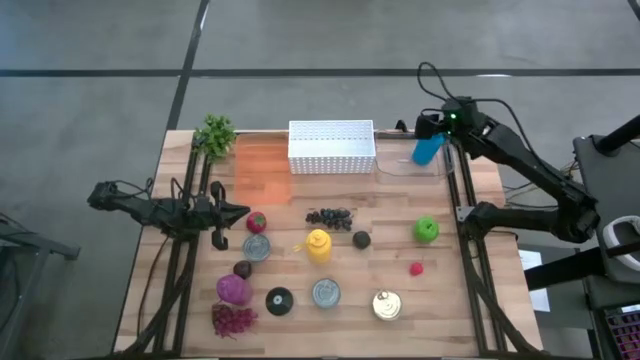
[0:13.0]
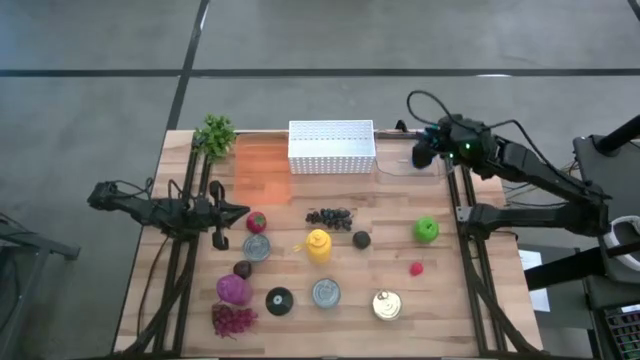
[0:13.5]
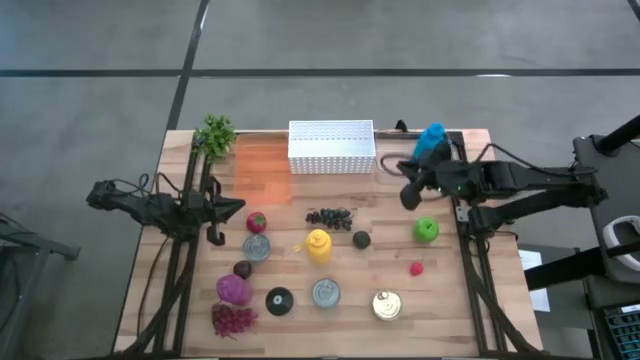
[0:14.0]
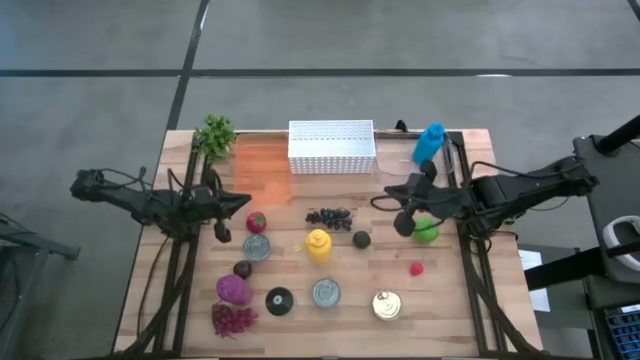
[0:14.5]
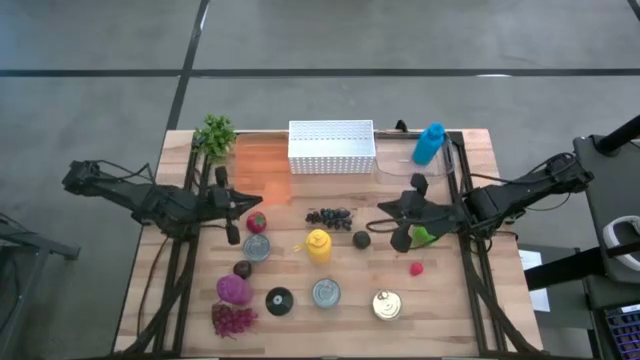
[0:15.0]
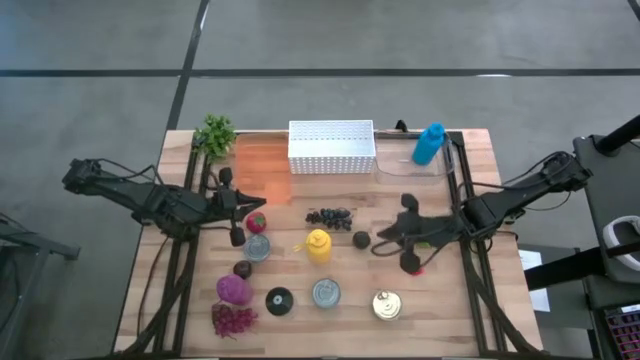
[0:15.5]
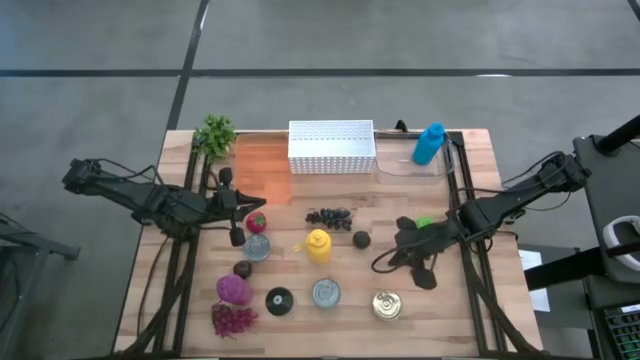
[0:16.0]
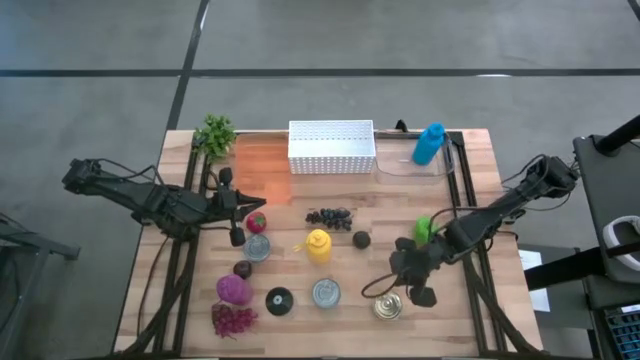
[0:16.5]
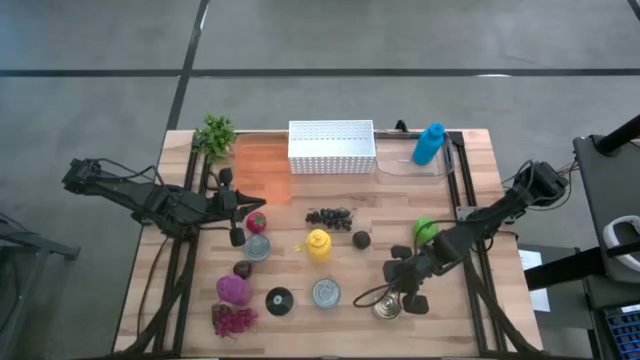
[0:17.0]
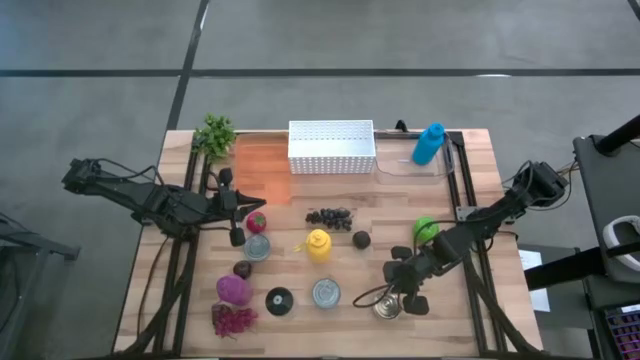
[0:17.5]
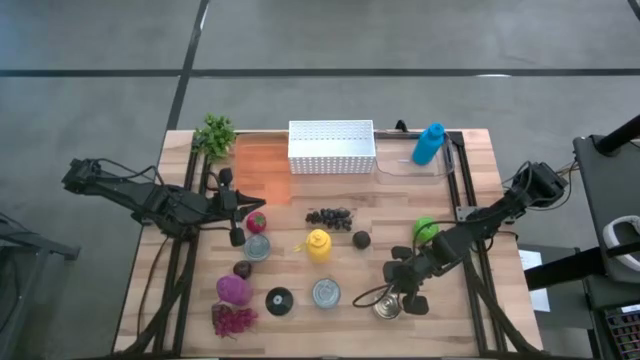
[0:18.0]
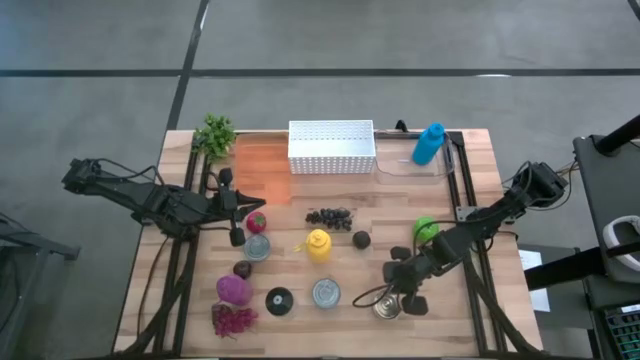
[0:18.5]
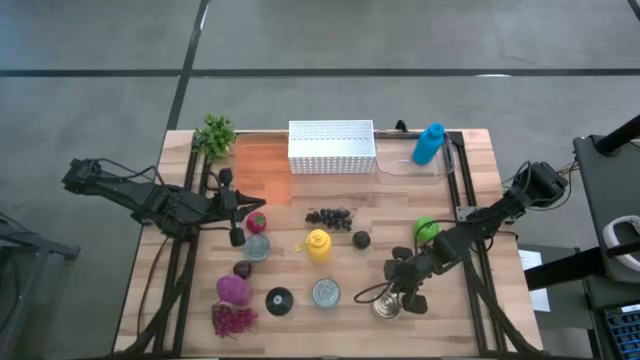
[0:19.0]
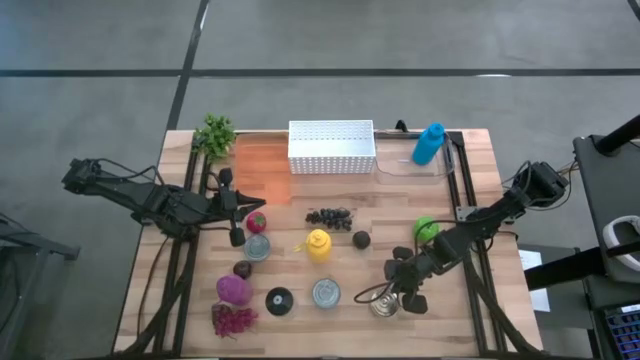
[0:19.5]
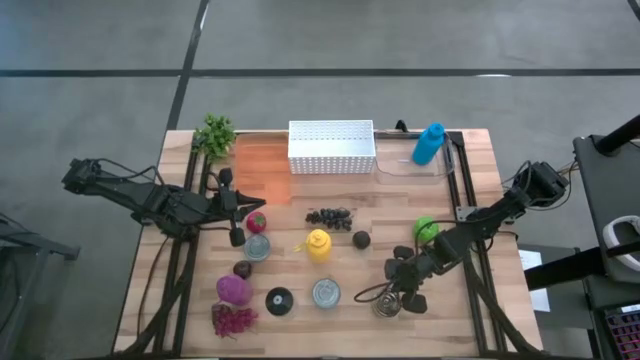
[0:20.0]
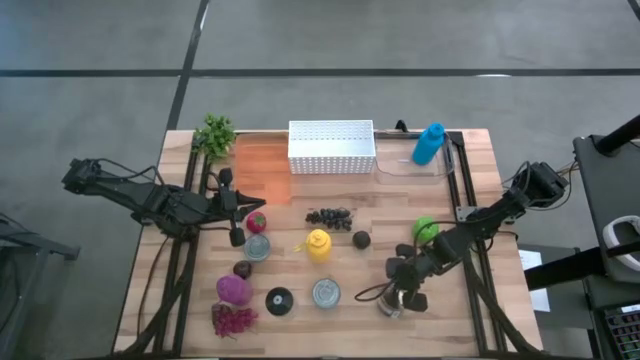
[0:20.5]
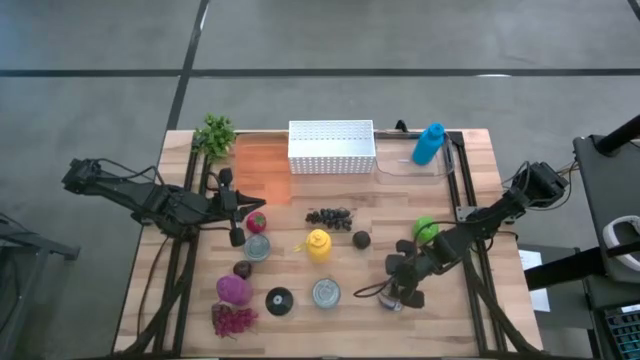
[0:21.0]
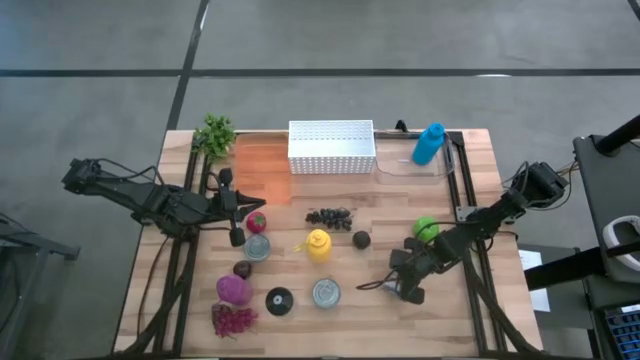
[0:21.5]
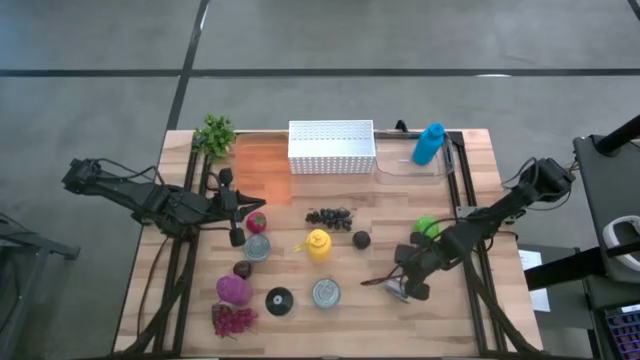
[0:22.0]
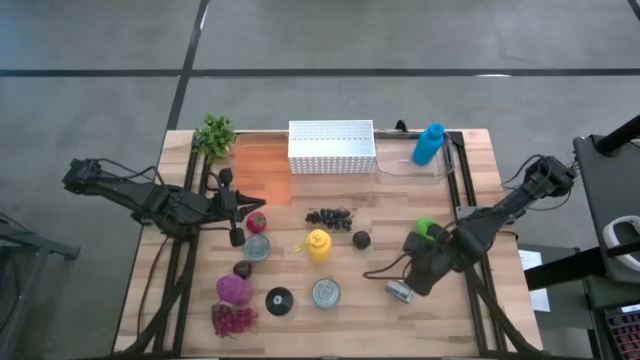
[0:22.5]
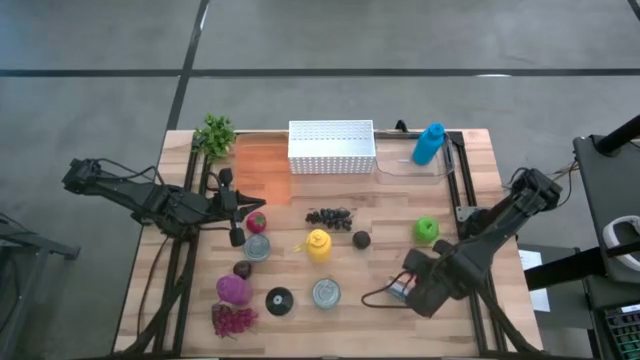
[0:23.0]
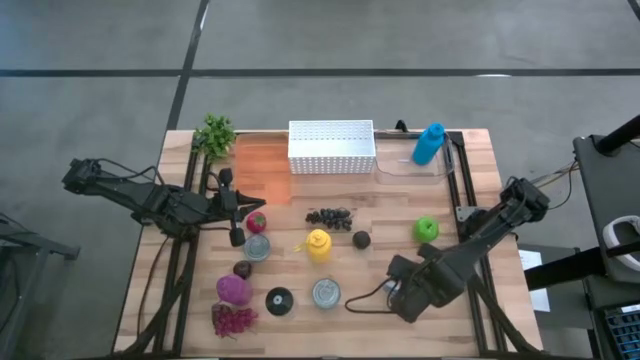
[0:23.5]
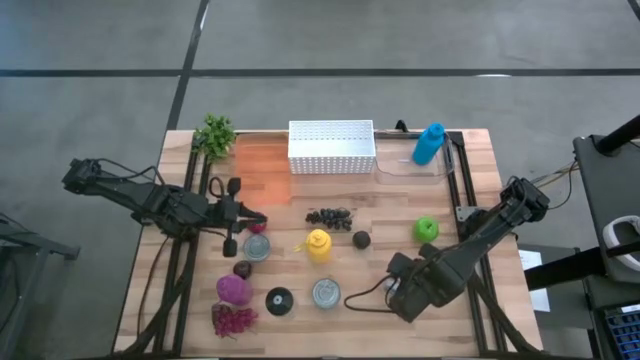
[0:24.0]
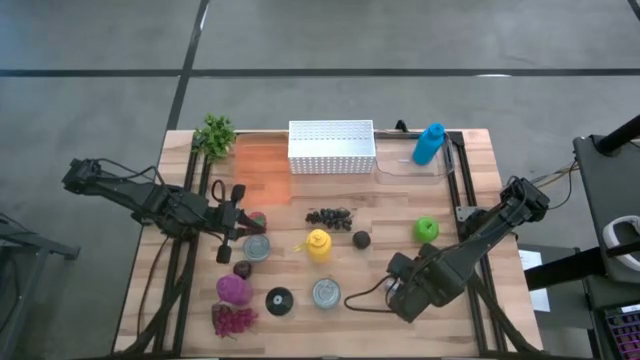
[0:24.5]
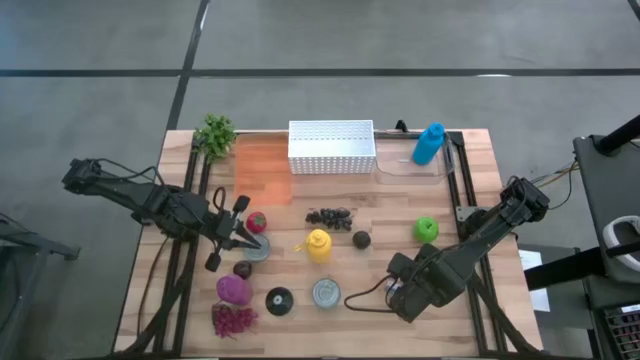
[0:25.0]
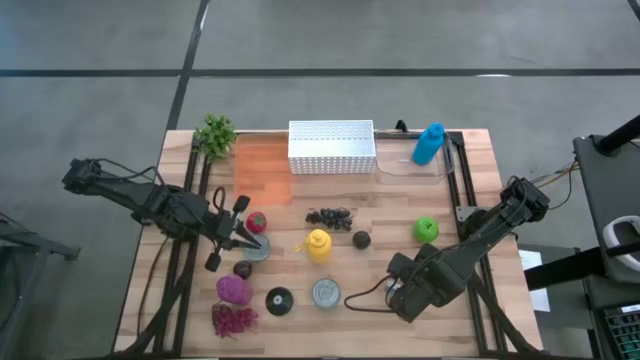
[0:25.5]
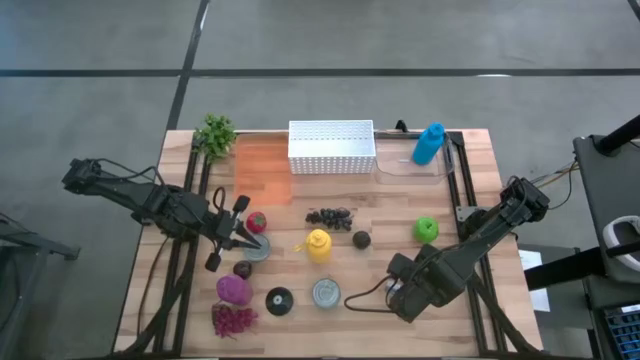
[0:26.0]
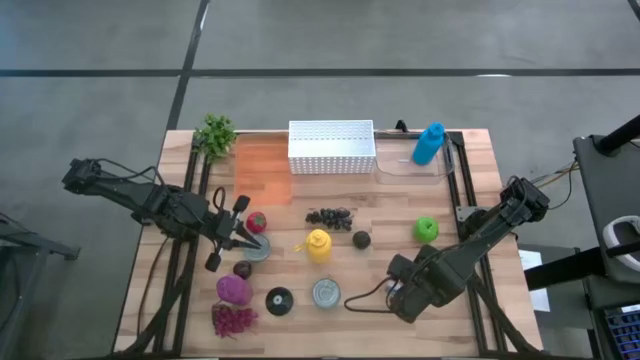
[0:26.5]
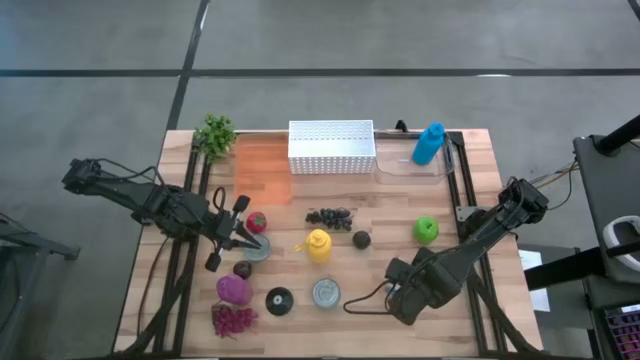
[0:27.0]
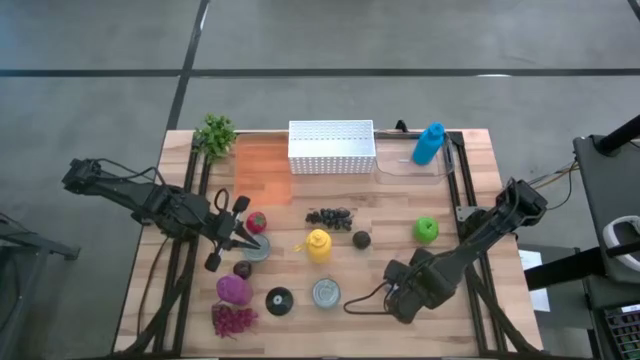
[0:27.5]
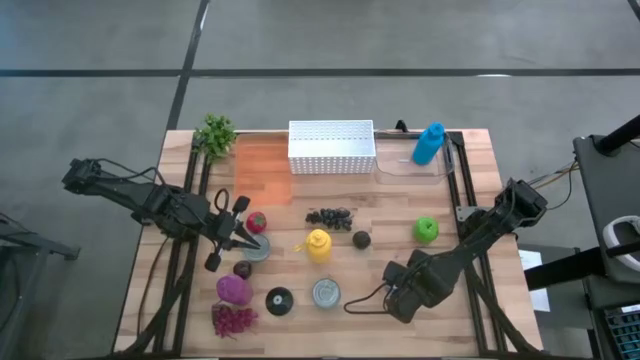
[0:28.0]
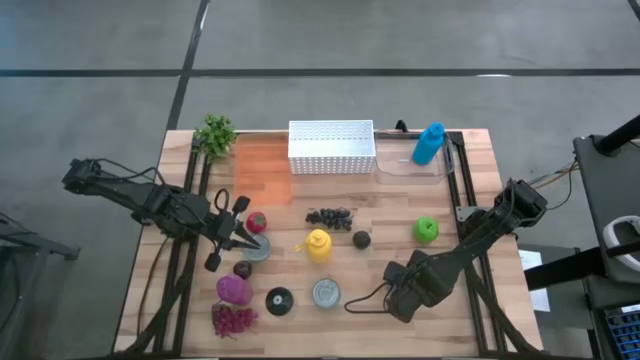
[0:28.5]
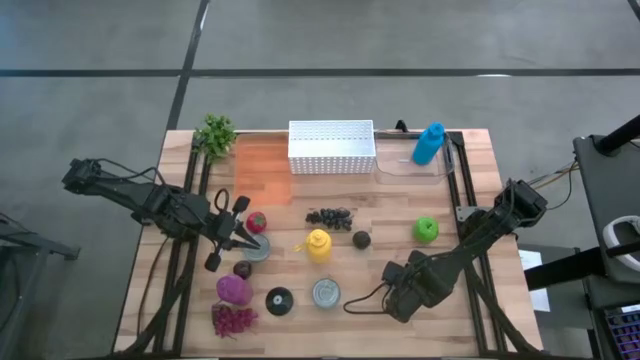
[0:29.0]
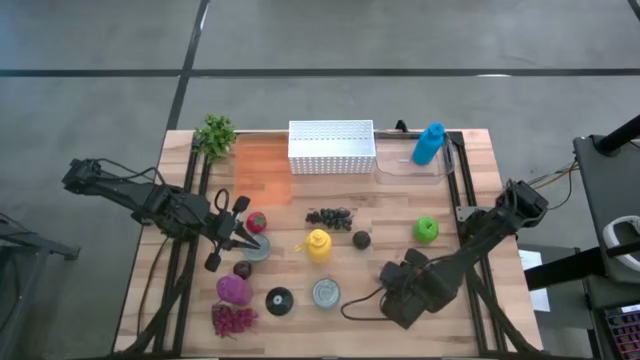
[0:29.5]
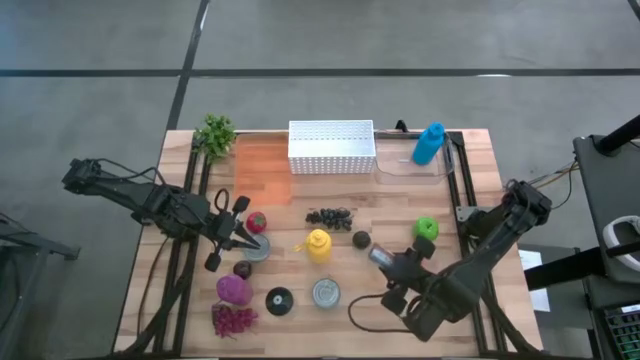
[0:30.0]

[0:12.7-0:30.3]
Task: Pick & Place Food Item
Put the blue-pink tuna can into the orange bin

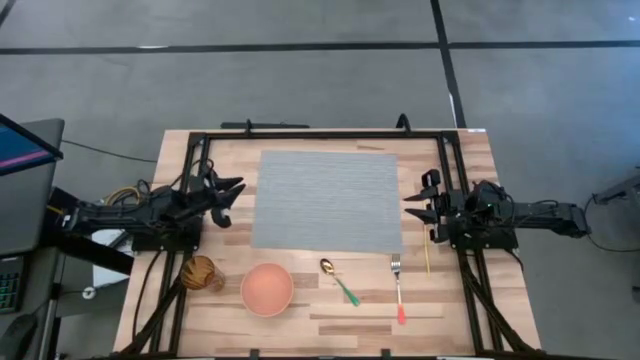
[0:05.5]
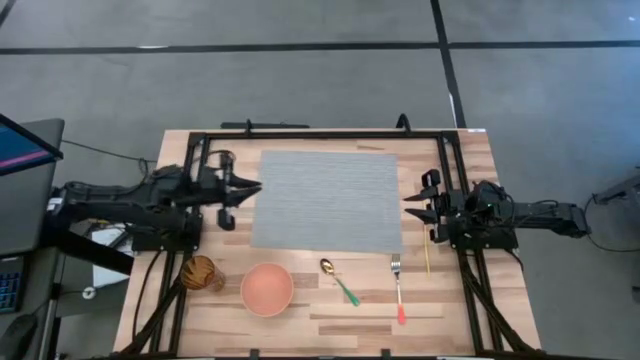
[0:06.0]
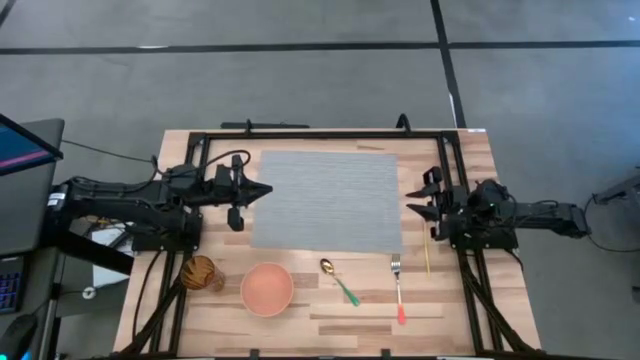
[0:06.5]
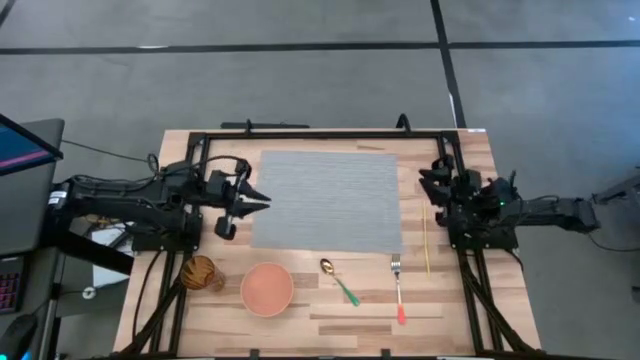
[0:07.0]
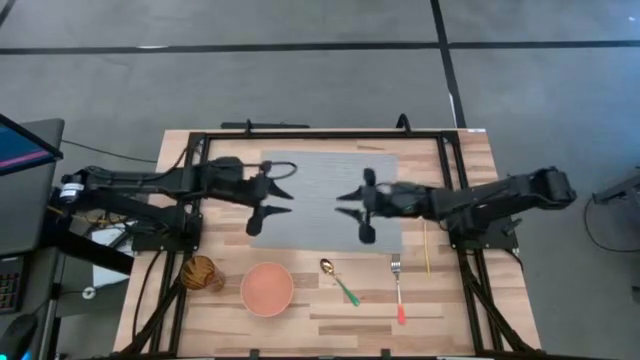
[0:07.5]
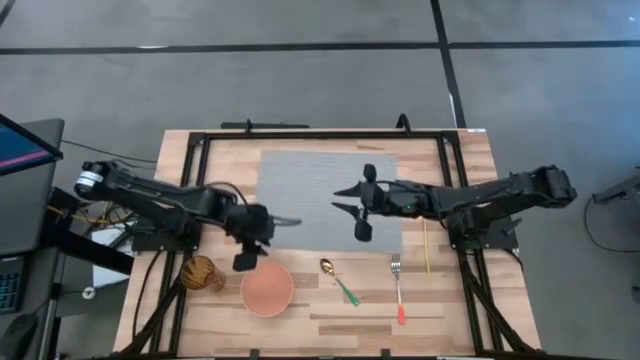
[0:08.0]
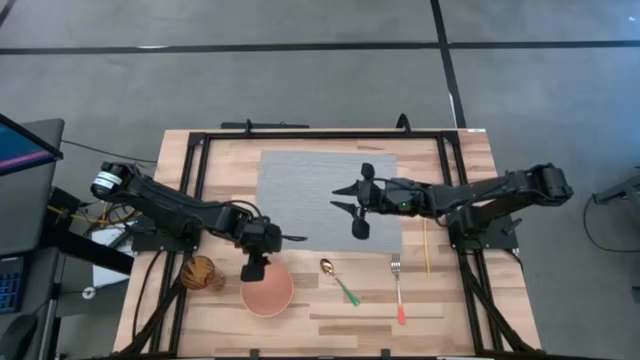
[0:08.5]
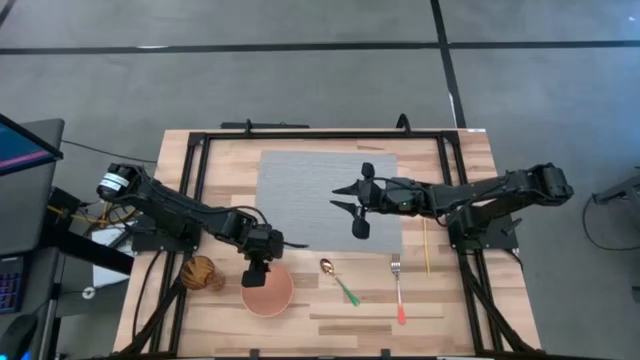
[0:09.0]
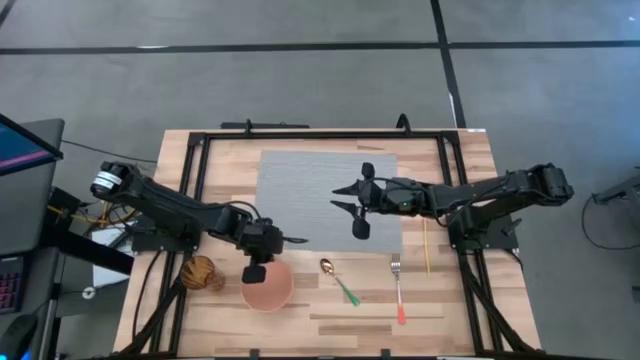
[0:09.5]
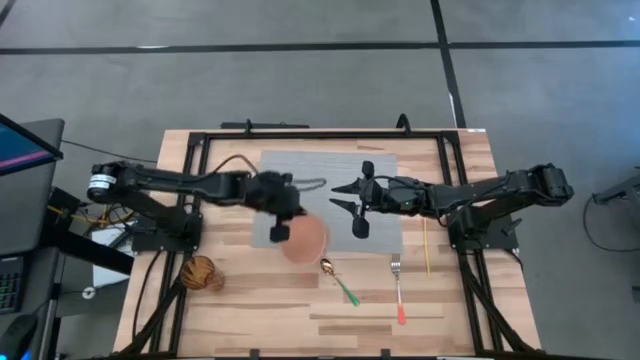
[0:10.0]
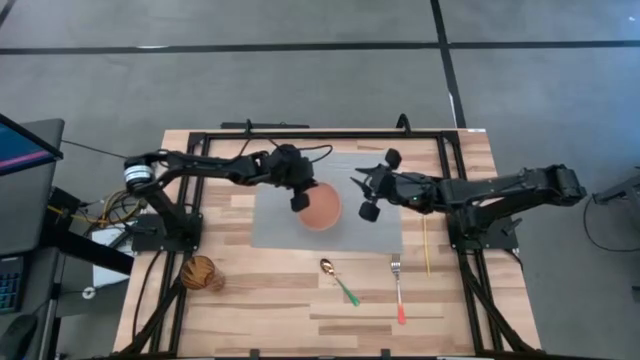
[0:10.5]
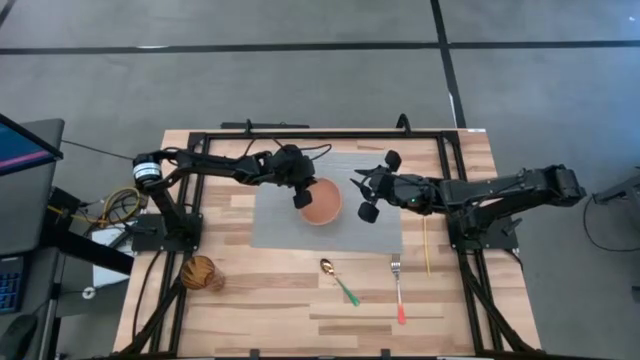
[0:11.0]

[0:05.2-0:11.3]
Task: Pick & Place Utensil
Put the orange bowl on the gray mat
